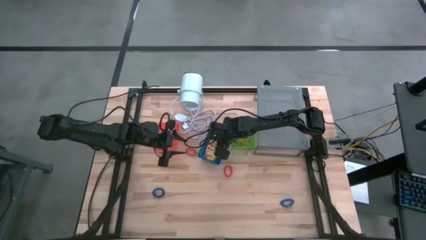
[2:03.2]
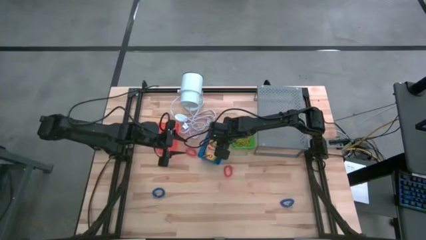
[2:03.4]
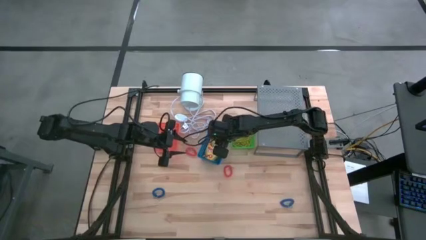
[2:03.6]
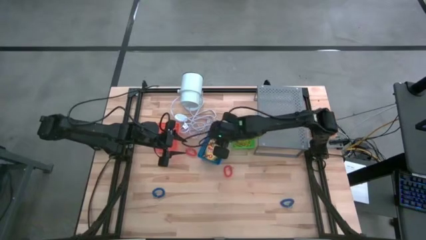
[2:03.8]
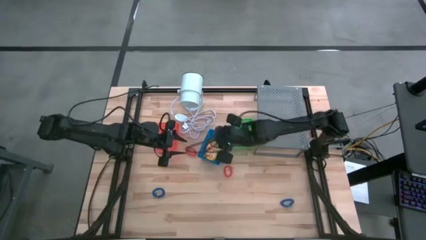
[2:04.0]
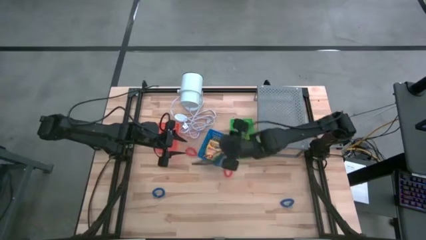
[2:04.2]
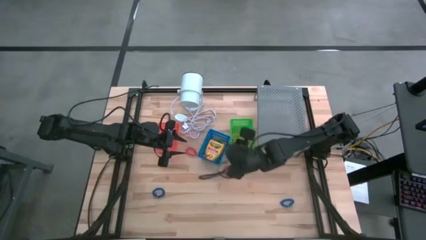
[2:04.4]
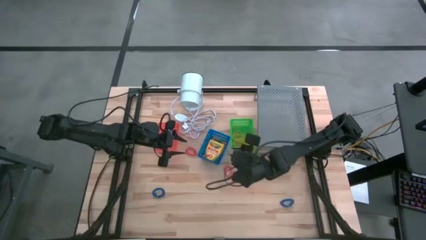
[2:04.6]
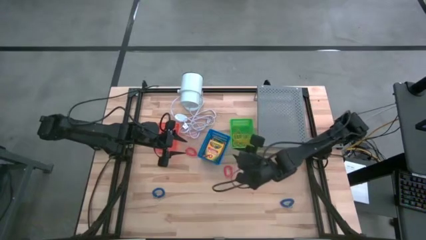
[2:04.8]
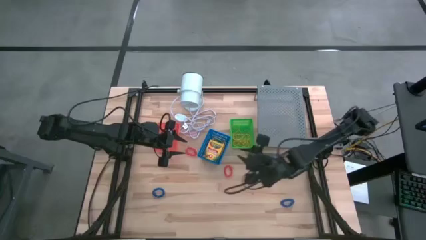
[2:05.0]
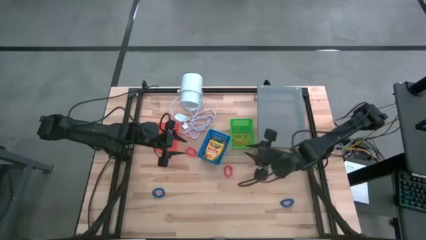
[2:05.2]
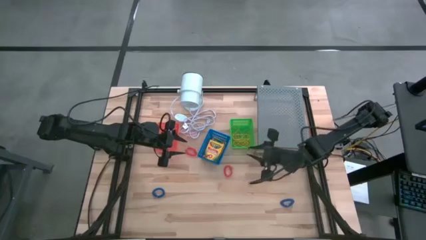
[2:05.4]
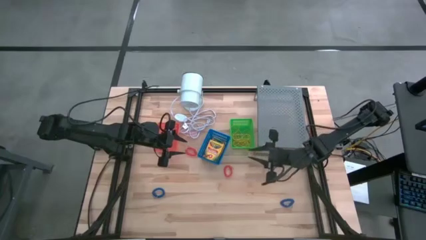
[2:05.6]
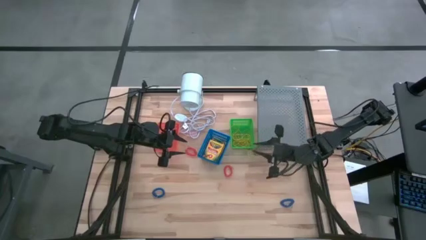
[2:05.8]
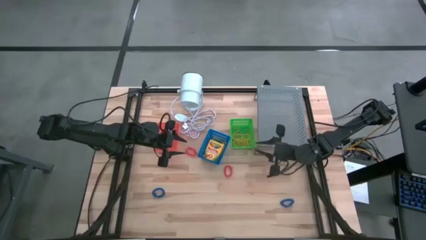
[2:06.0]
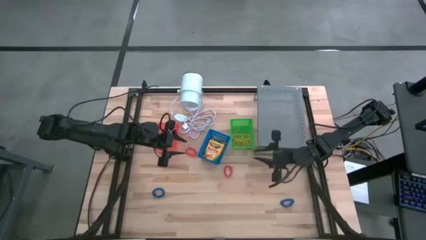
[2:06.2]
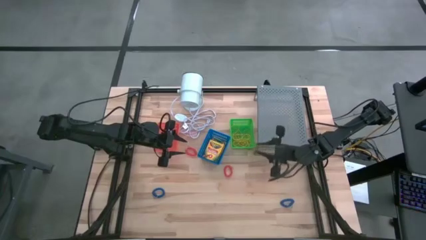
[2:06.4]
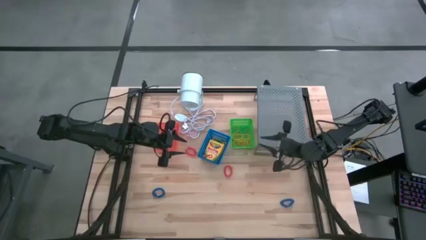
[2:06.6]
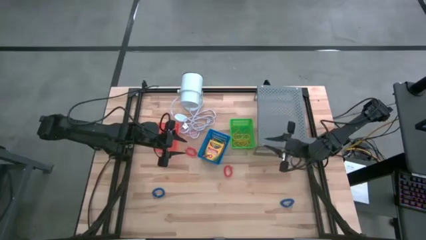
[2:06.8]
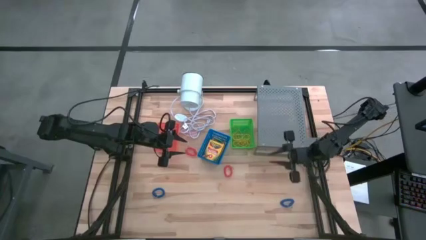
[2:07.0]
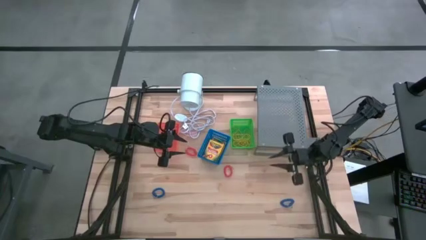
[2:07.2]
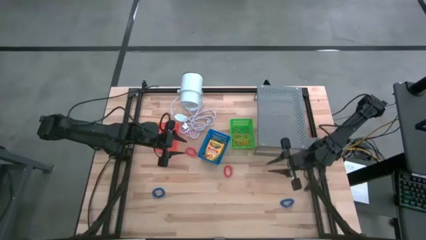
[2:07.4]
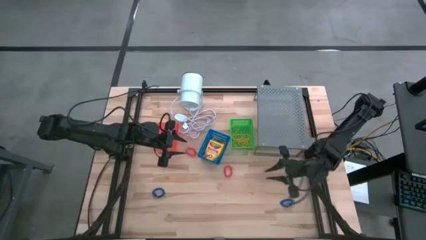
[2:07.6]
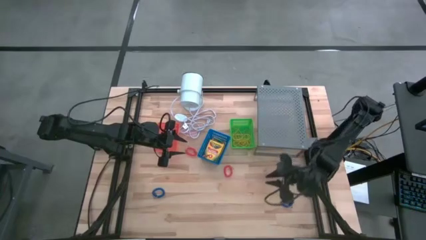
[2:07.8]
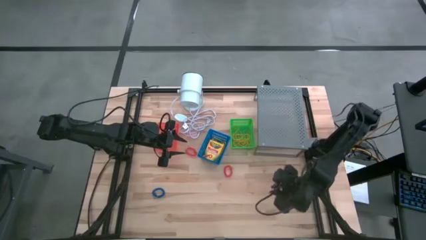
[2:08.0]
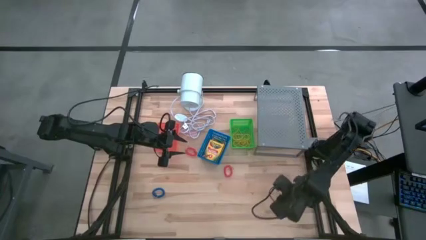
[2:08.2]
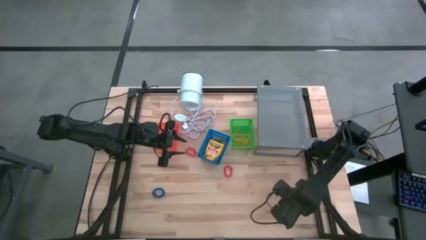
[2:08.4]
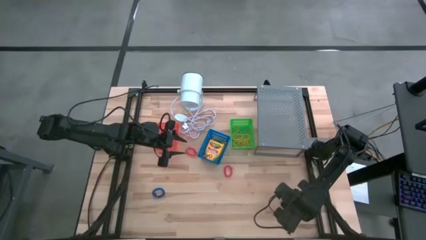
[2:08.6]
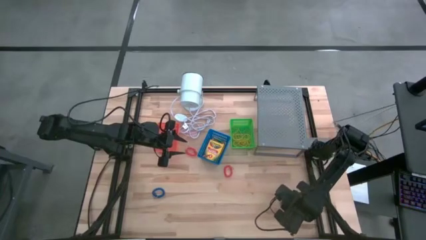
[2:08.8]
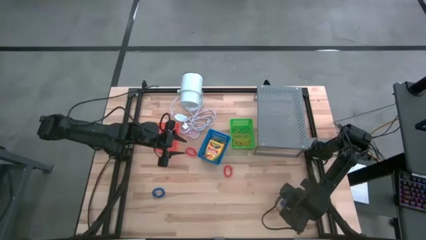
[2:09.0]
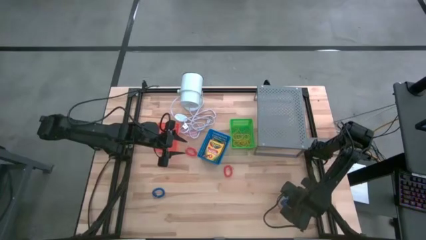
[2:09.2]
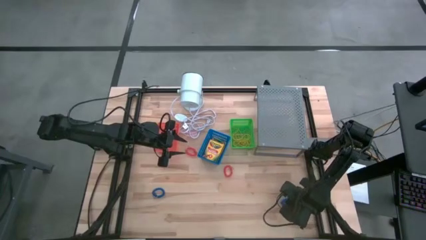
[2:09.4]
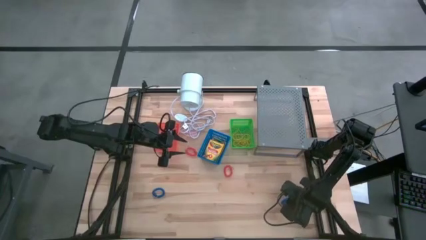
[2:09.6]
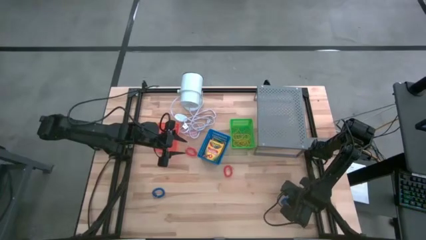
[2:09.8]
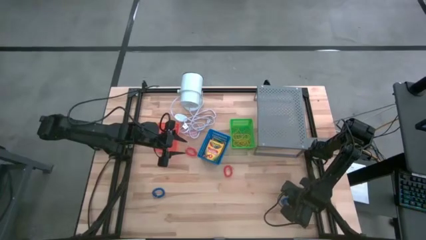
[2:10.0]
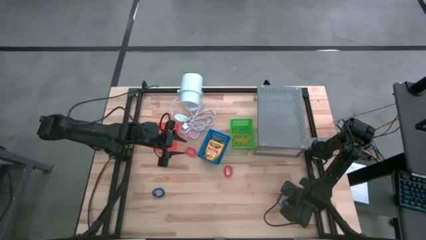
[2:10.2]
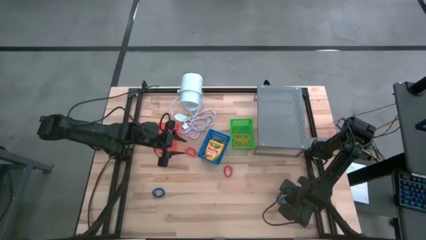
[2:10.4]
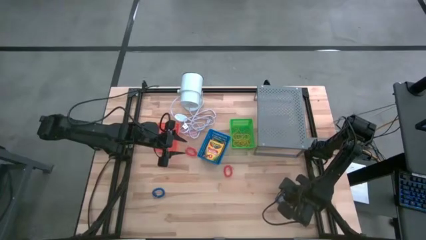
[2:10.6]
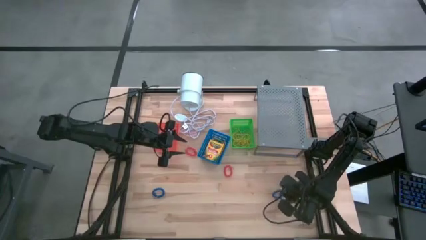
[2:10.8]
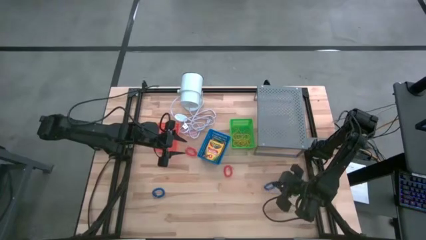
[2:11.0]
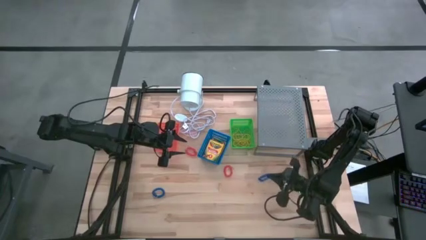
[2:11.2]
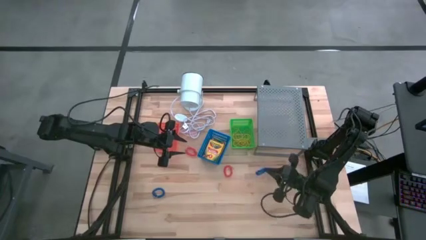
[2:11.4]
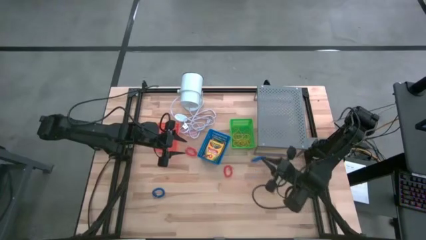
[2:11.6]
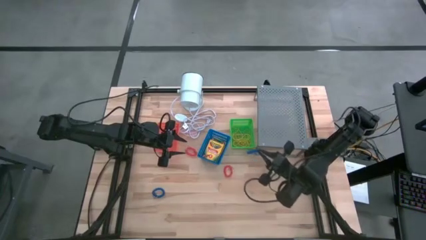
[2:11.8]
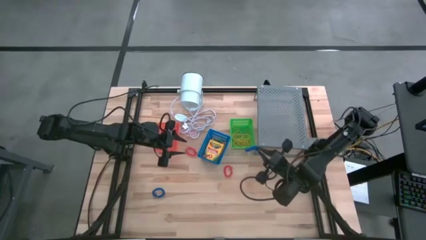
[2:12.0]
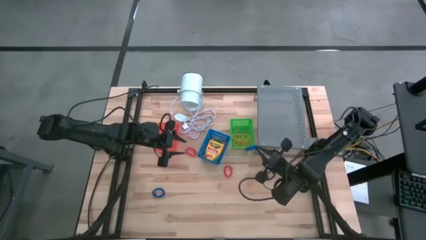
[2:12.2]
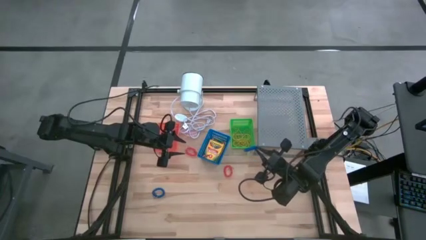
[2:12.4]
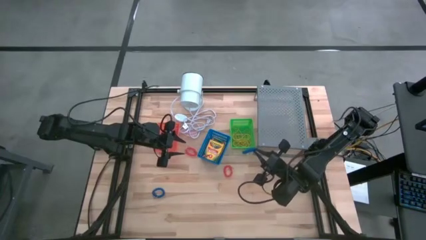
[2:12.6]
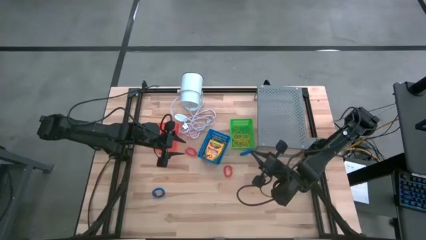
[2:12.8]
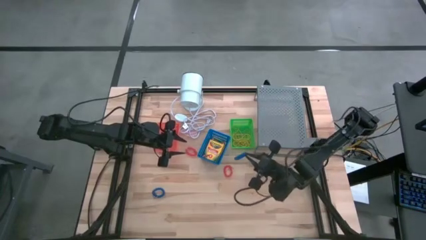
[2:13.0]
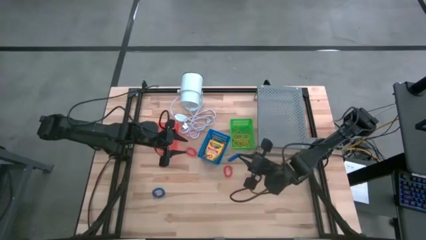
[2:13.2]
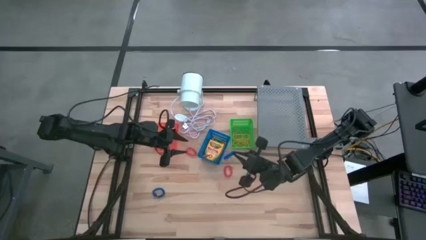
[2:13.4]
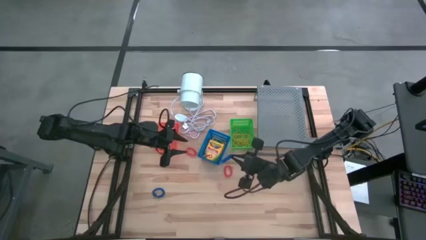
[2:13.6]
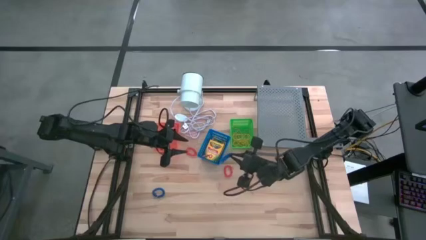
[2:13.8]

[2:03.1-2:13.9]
Task: Pick & Place Office Desk Supplies
Put the blue spring keychain into the orange bin
